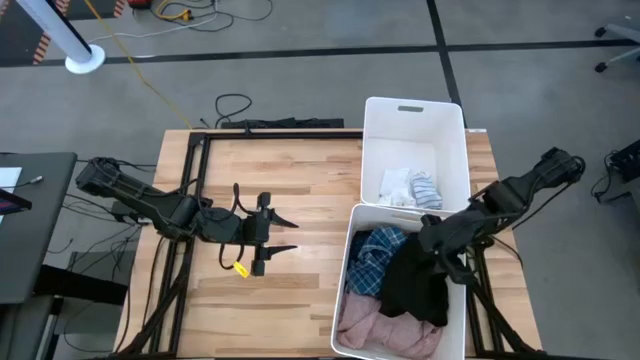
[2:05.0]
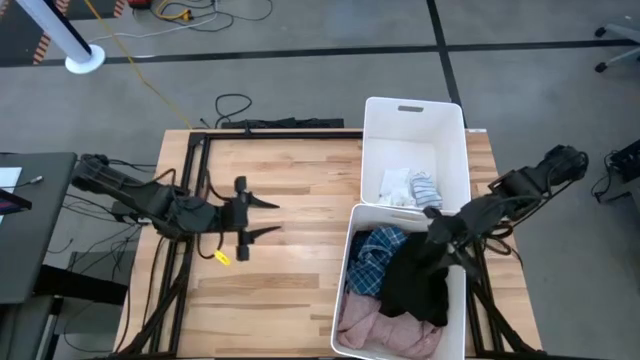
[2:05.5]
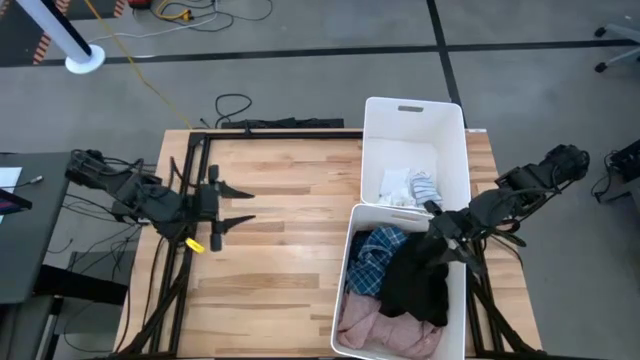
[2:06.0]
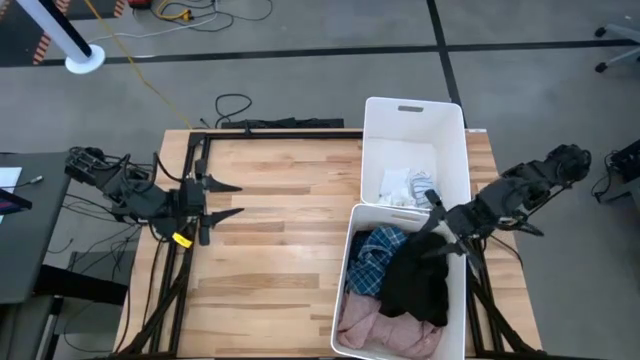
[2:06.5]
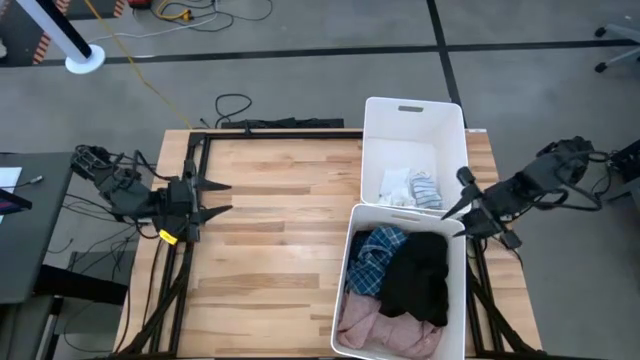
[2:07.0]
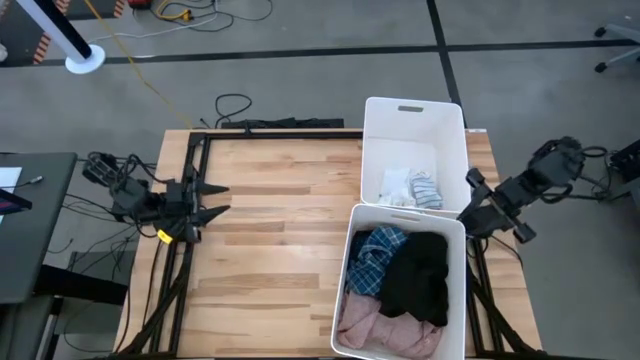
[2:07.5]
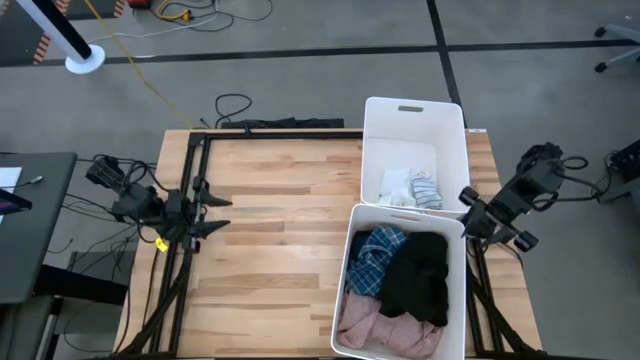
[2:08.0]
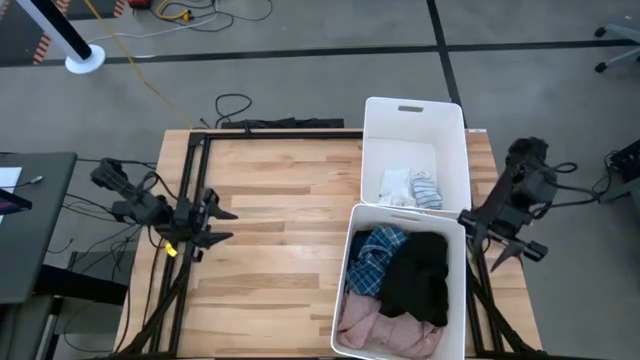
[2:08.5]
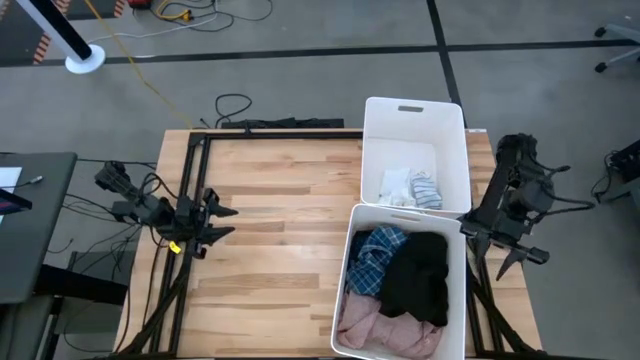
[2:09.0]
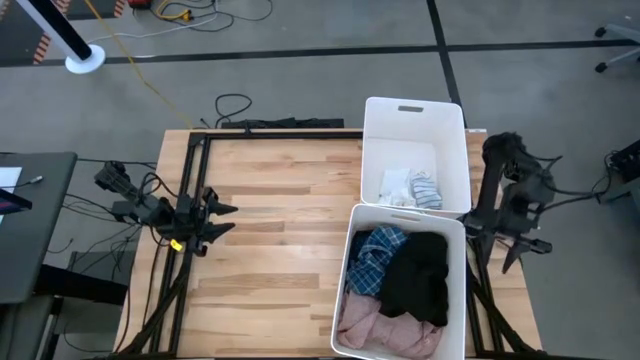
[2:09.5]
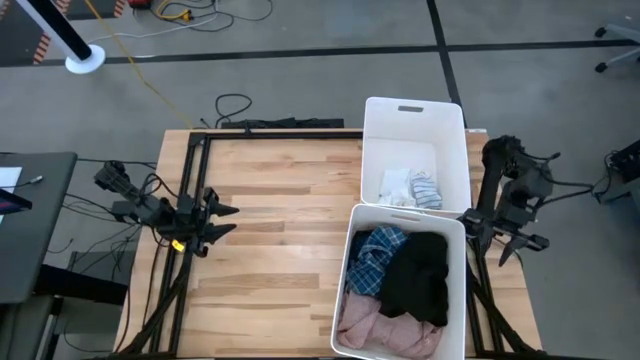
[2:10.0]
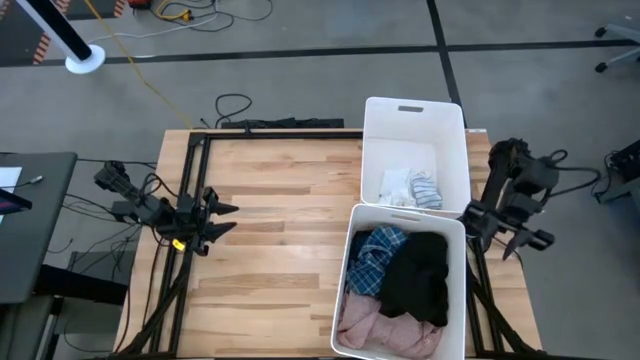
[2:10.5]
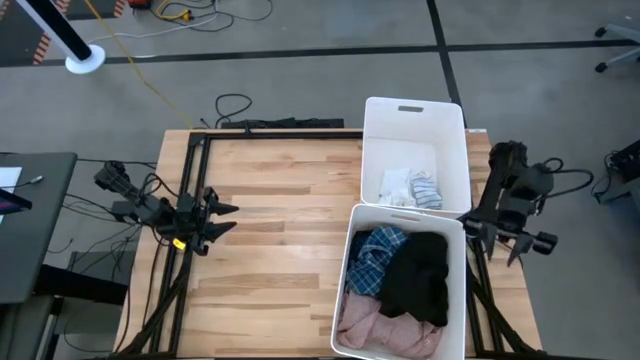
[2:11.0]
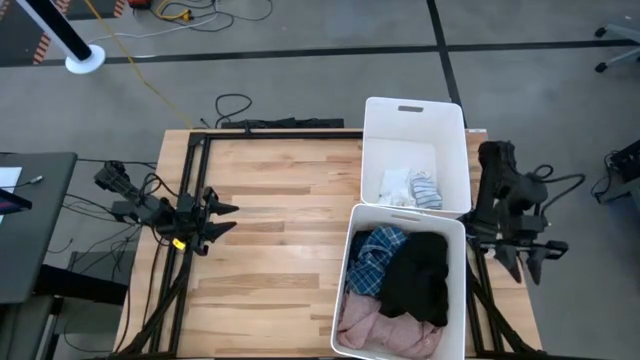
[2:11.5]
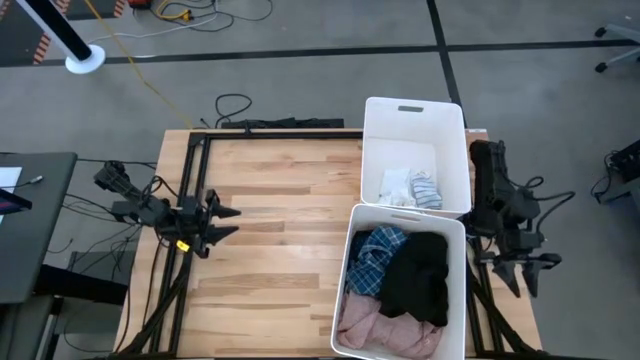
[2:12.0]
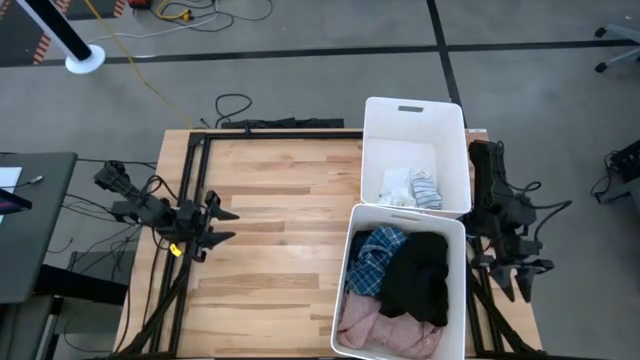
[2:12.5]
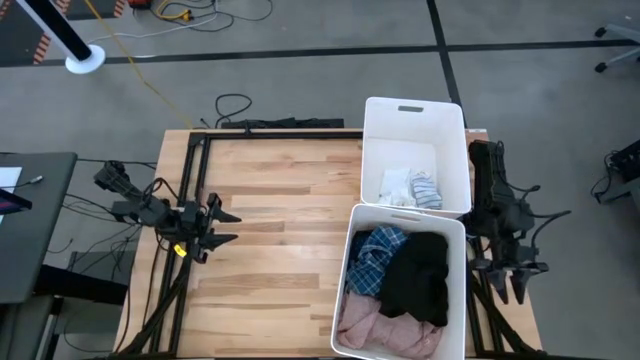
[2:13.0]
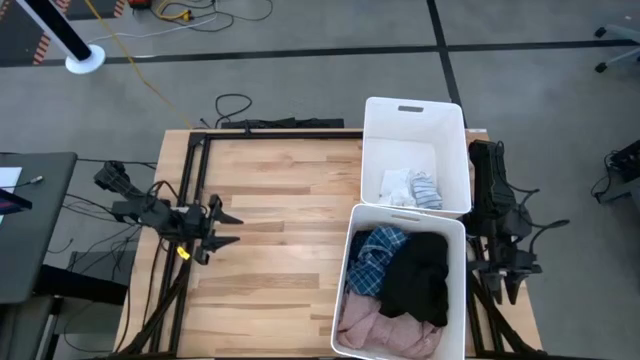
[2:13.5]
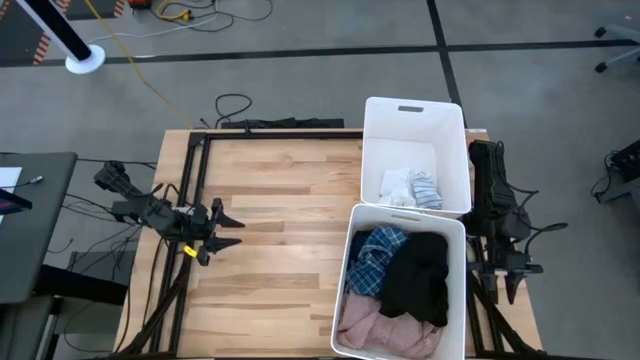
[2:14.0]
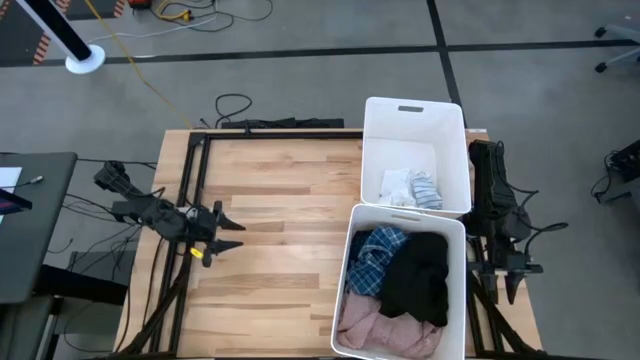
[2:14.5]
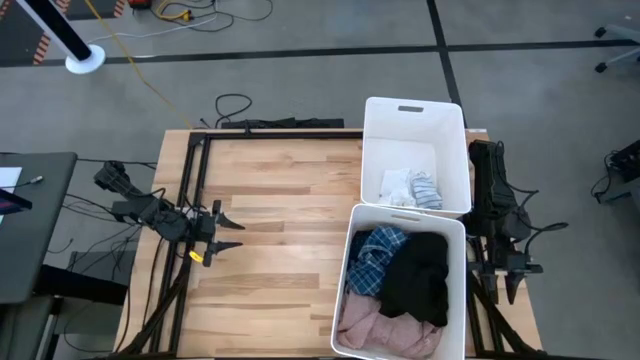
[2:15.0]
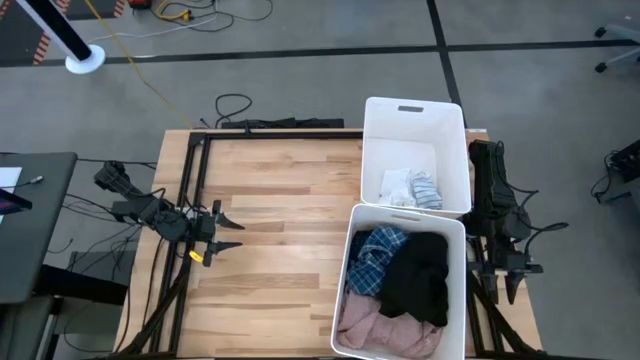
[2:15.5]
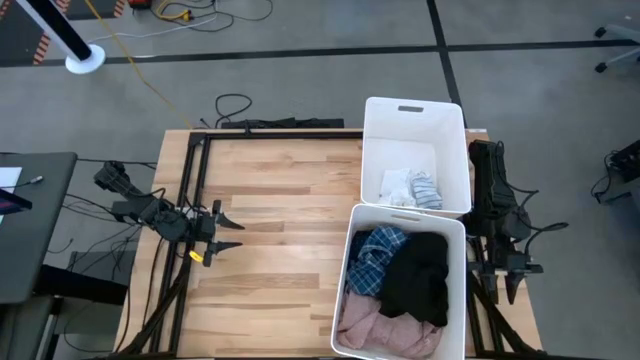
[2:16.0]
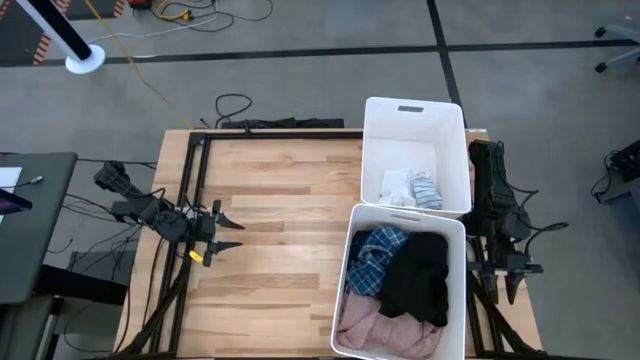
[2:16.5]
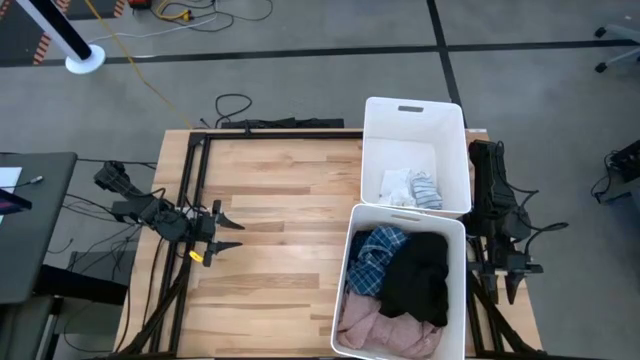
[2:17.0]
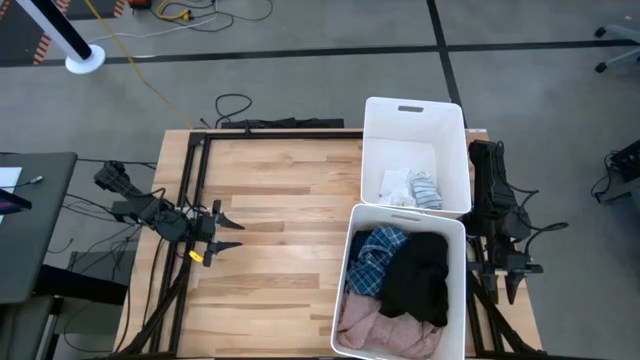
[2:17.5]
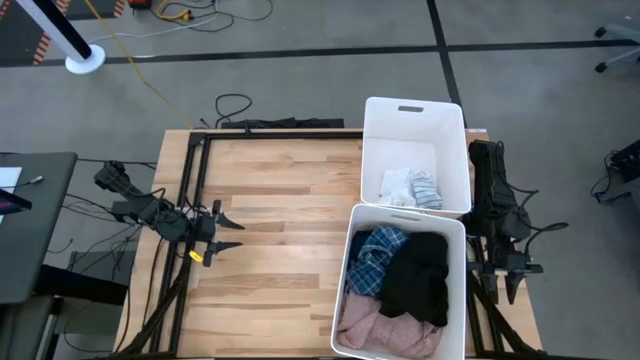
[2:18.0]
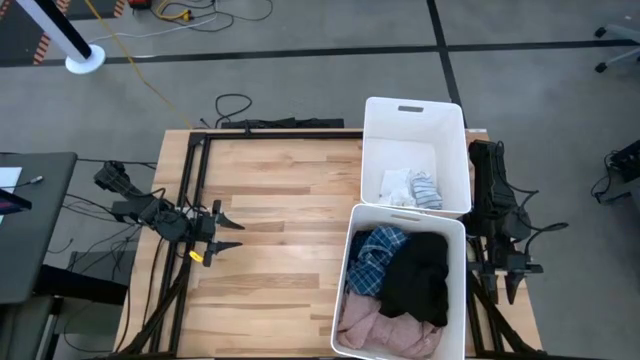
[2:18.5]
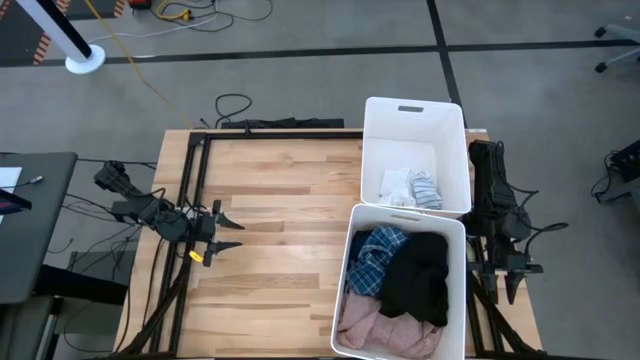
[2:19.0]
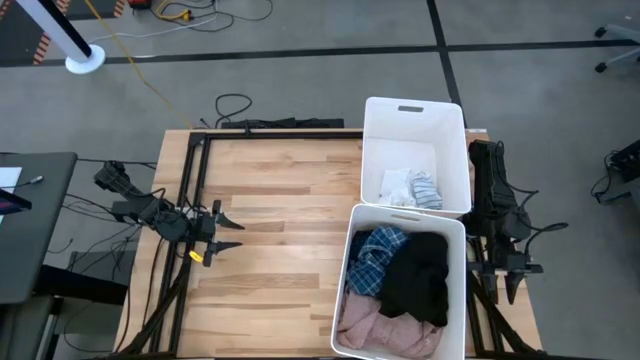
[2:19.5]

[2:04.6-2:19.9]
Task: Sort clothes
Return to Home Position

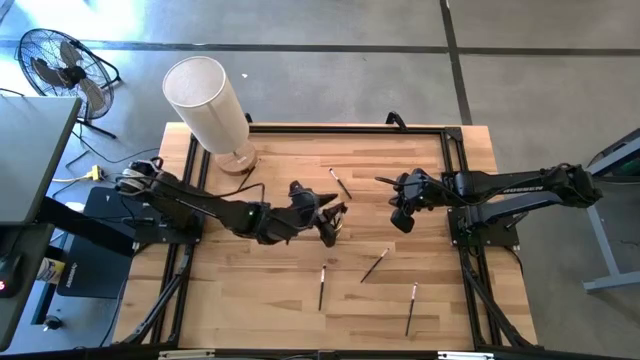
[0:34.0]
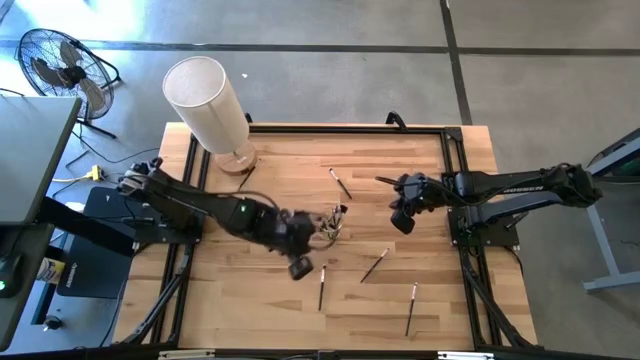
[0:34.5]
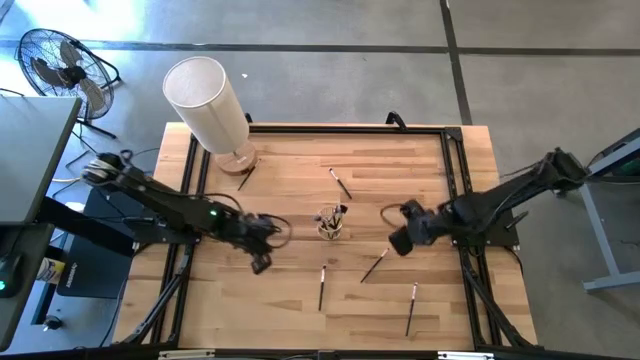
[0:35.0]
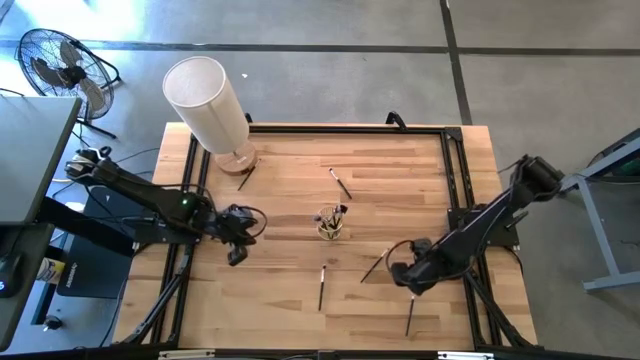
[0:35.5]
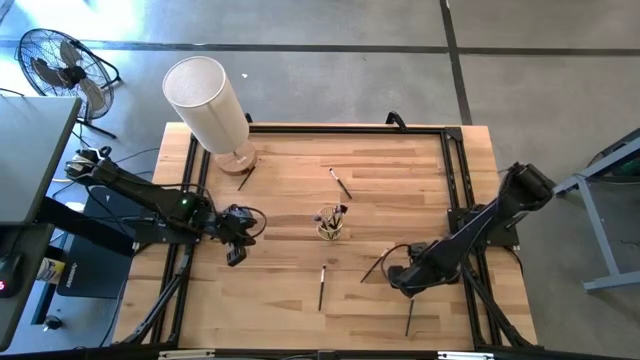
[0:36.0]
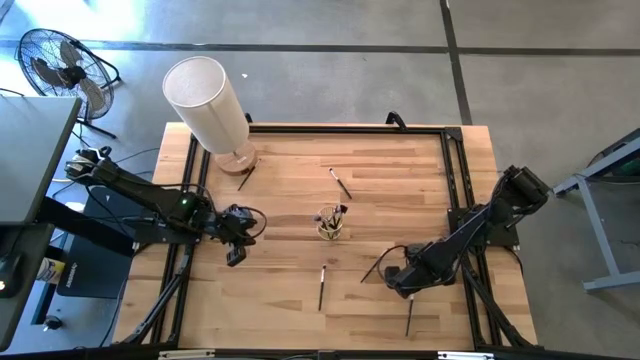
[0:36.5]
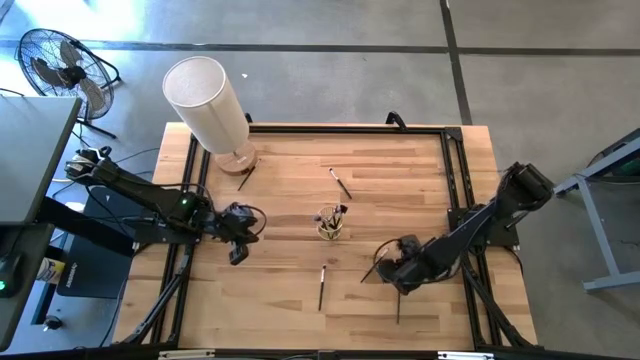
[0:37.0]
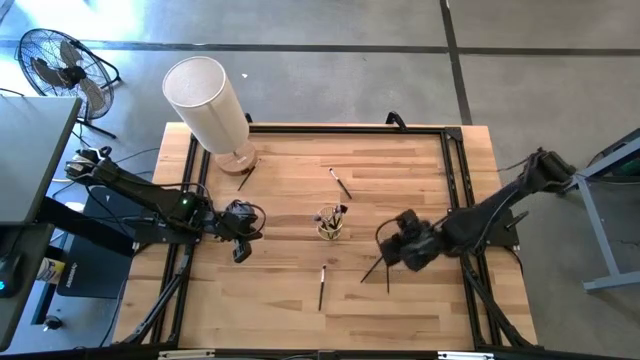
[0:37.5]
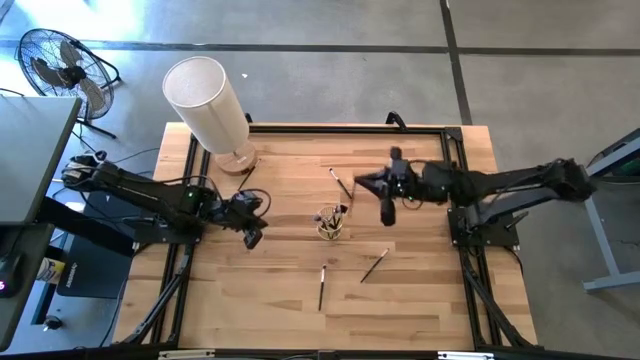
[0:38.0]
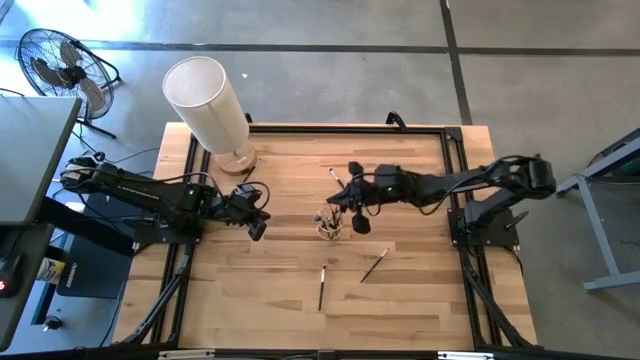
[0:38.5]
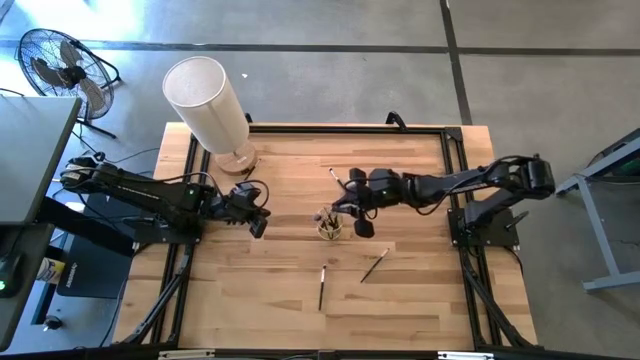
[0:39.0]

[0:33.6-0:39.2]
Task: Put items in baskets/containers
Put the eyeshadow brush into the wire organizer
